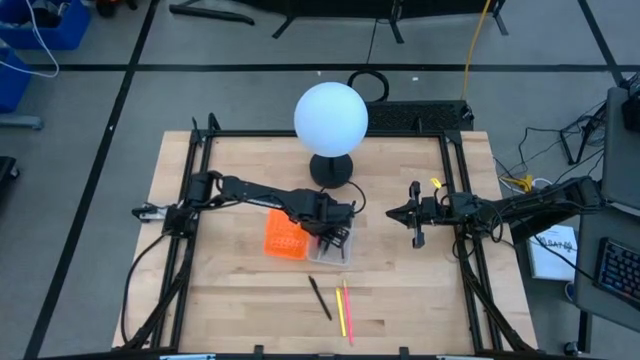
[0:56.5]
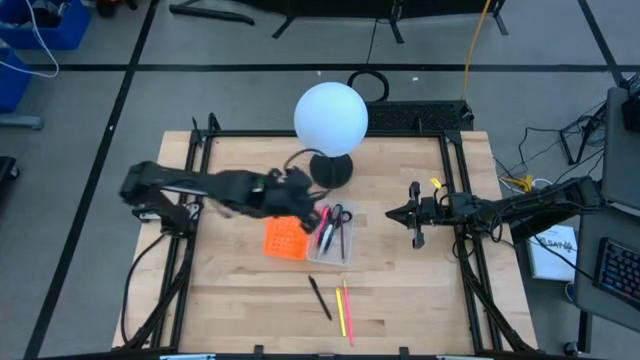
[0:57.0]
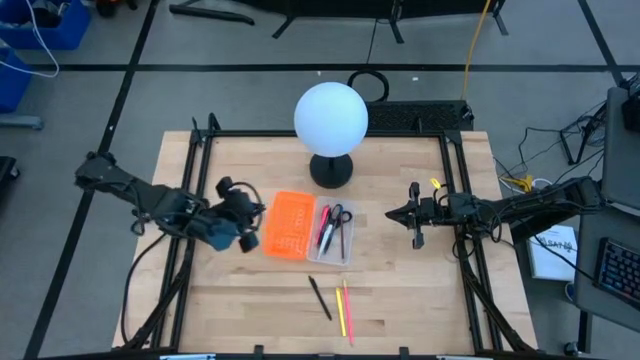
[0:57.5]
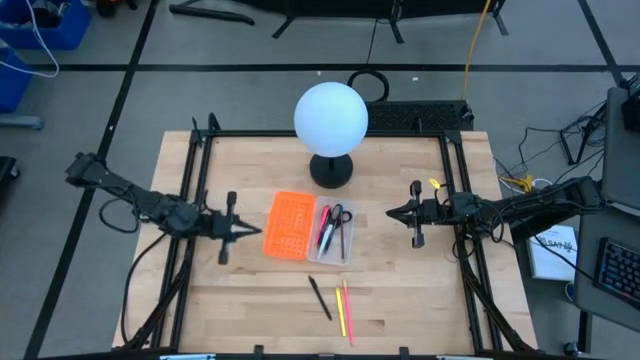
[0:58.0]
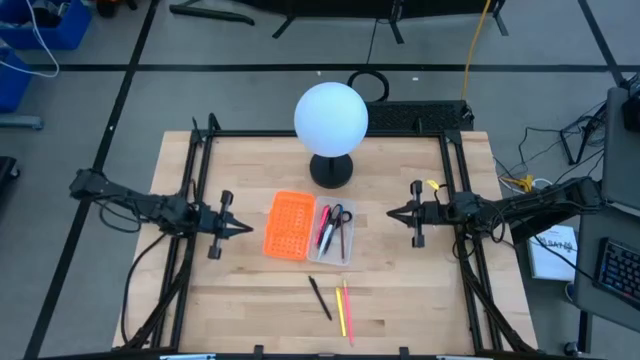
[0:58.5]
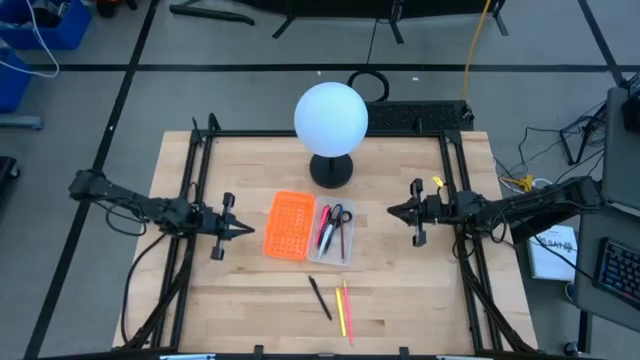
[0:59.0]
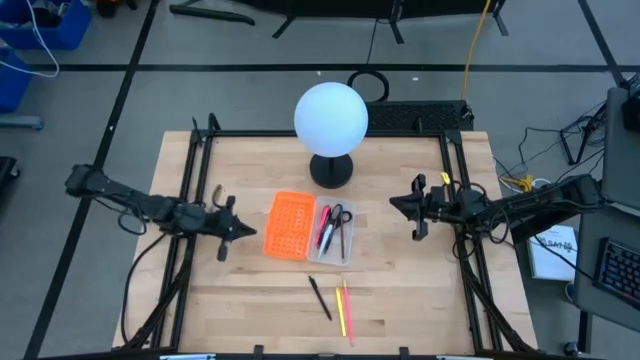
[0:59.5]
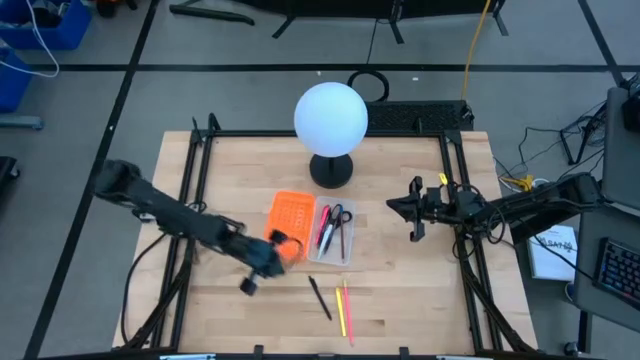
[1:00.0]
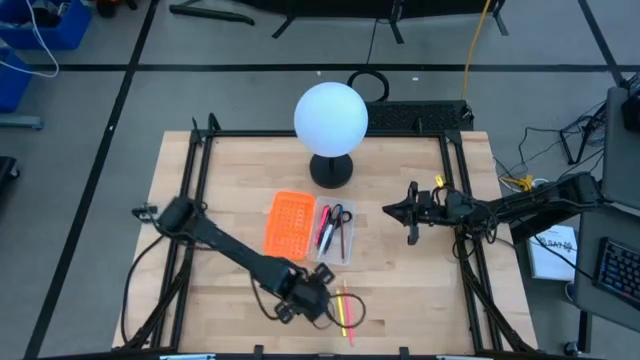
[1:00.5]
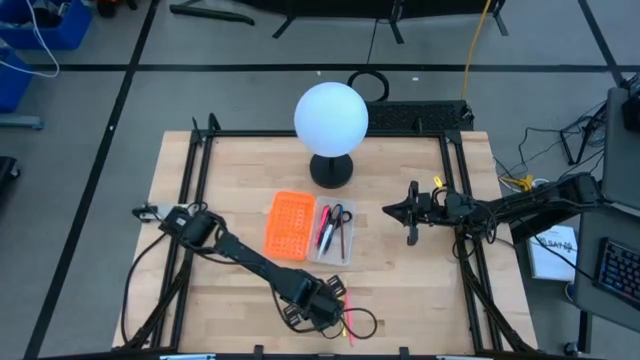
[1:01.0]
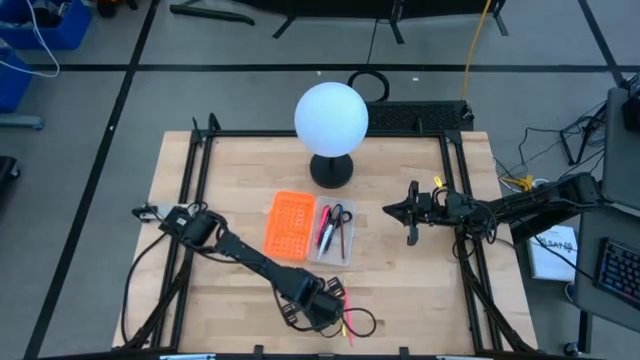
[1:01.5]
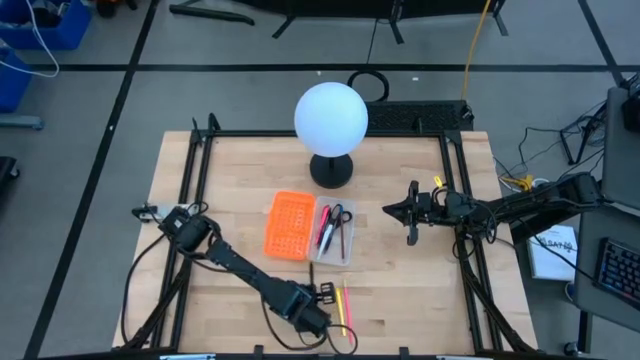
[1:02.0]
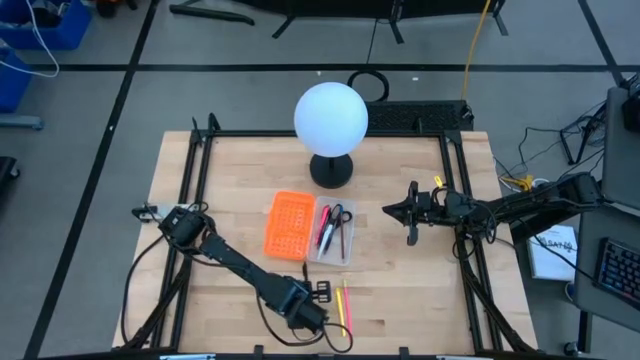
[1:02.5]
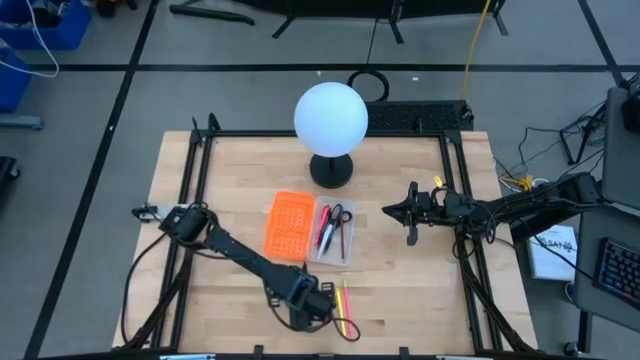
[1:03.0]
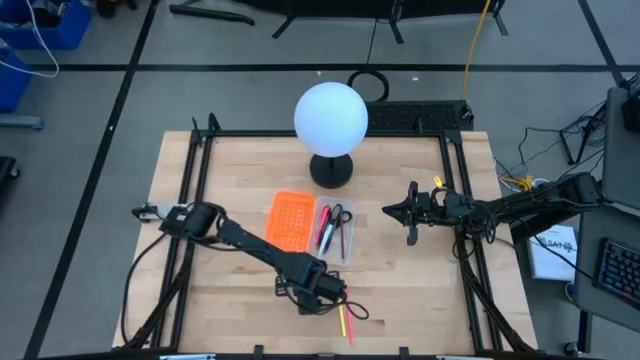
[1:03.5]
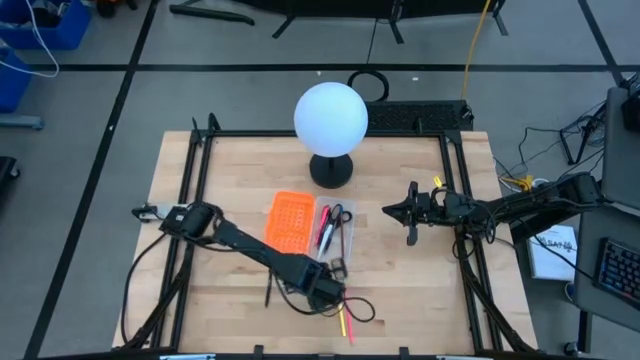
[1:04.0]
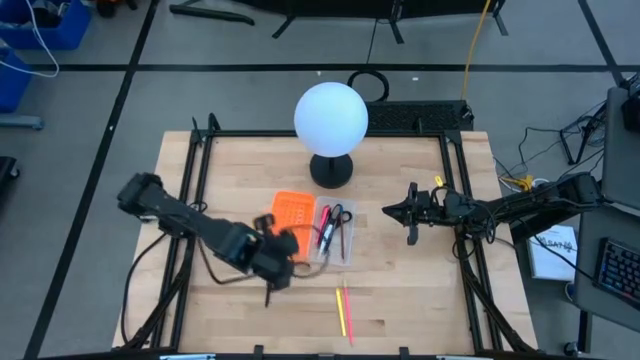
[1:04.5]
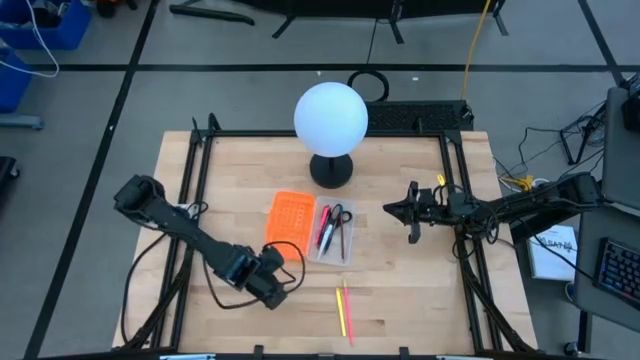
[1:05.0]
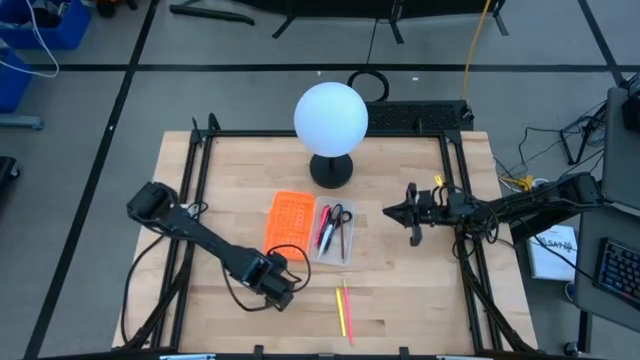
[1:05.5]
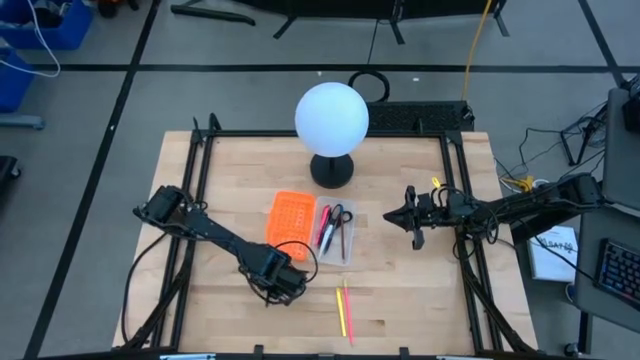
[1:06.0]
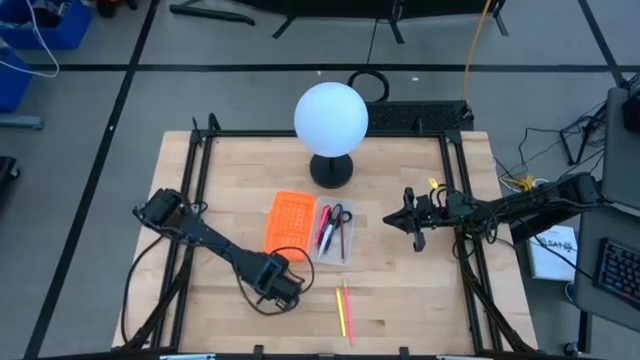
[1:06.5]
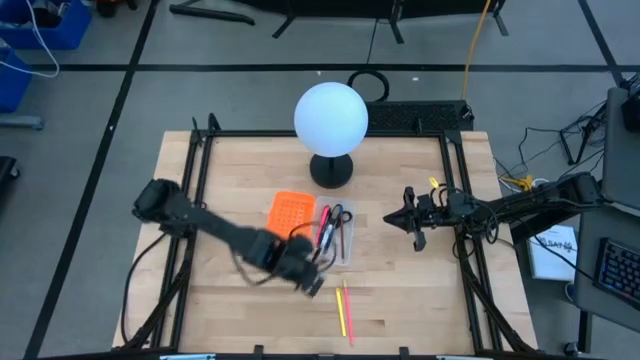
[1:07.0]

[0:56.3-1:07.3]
Task: Pick & place school supplies into a supply box
Put the black pen into the supply box

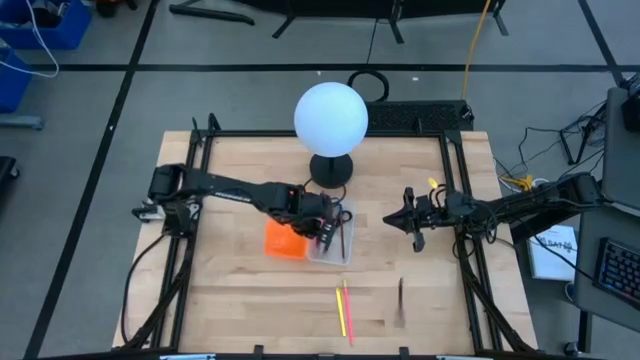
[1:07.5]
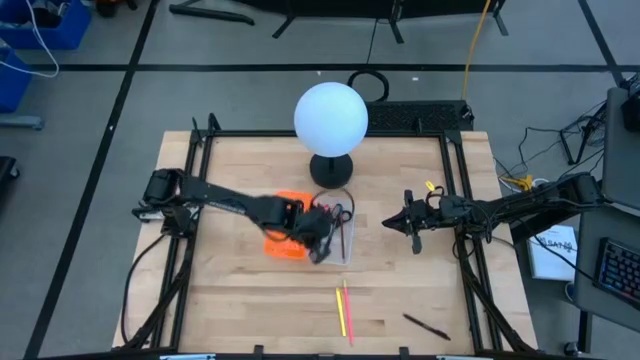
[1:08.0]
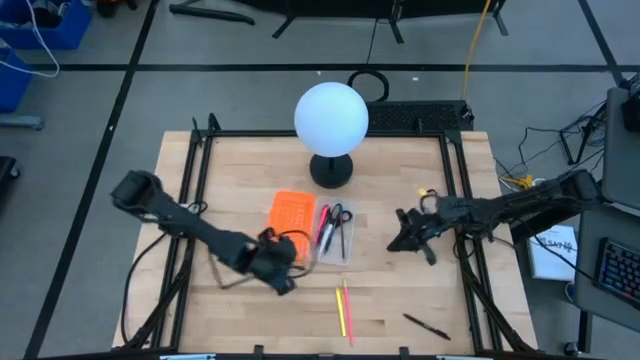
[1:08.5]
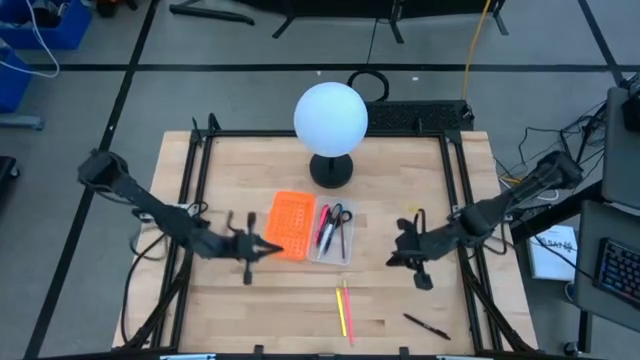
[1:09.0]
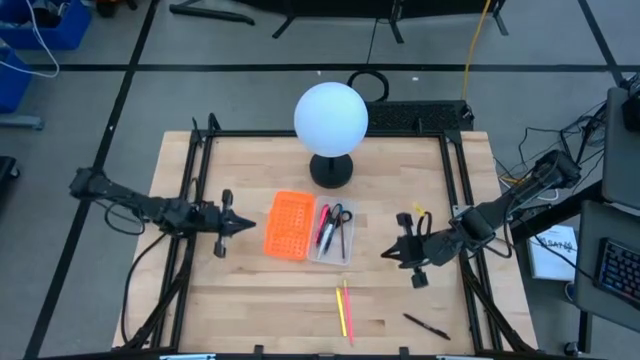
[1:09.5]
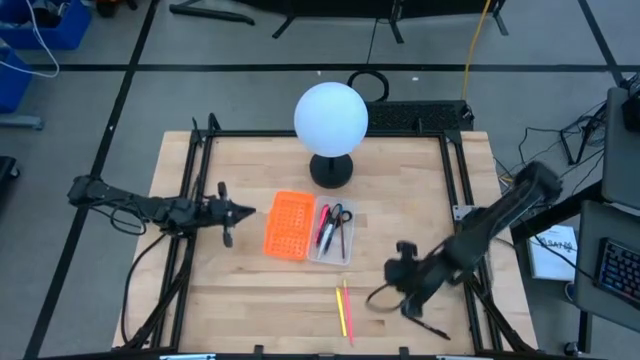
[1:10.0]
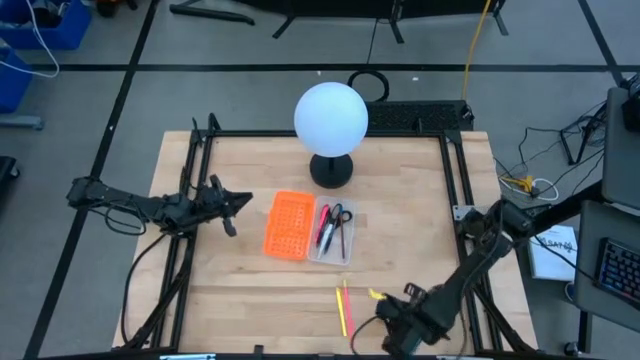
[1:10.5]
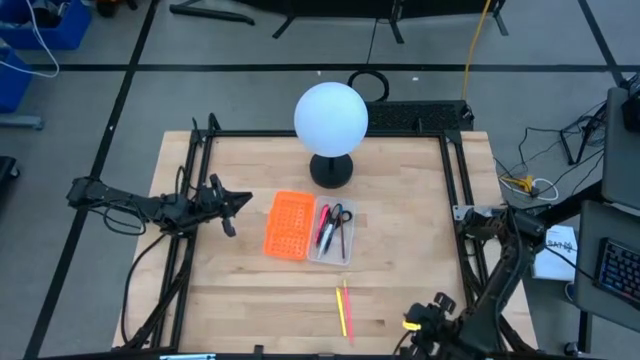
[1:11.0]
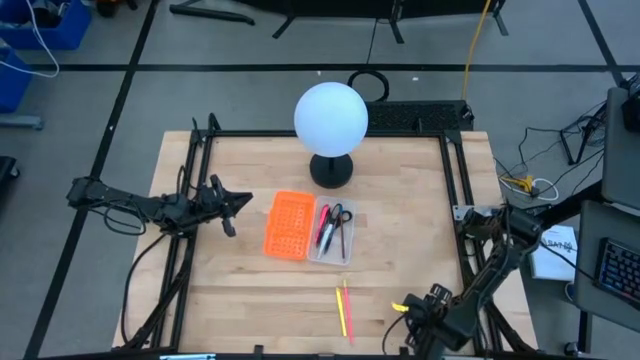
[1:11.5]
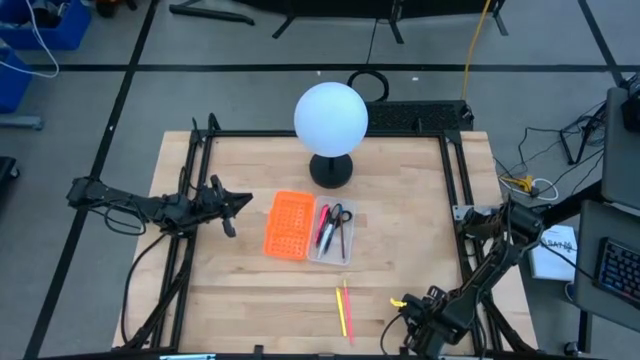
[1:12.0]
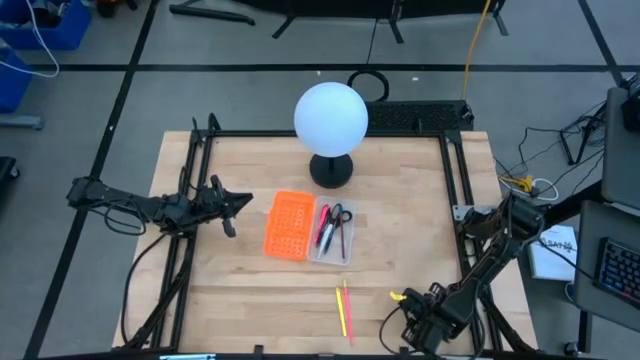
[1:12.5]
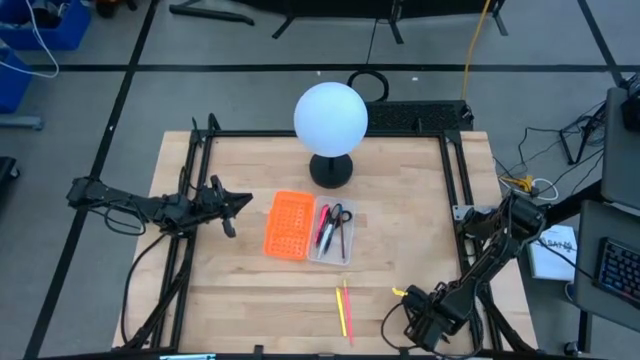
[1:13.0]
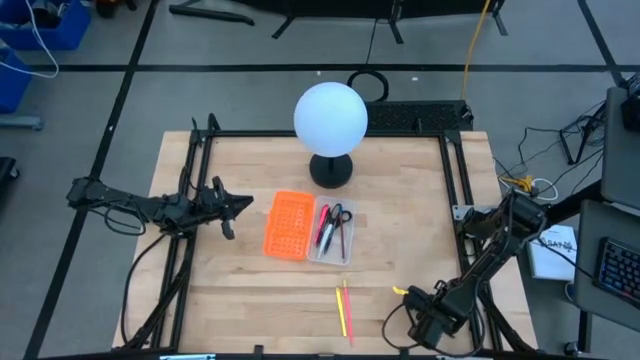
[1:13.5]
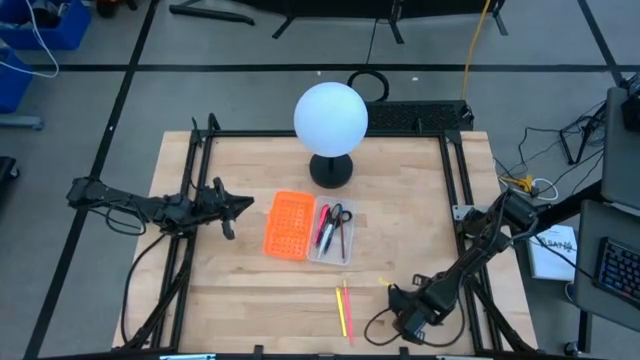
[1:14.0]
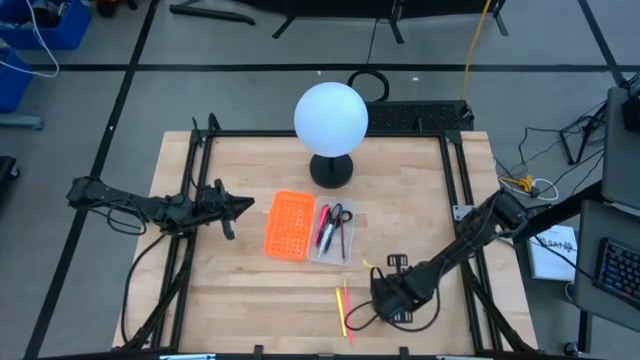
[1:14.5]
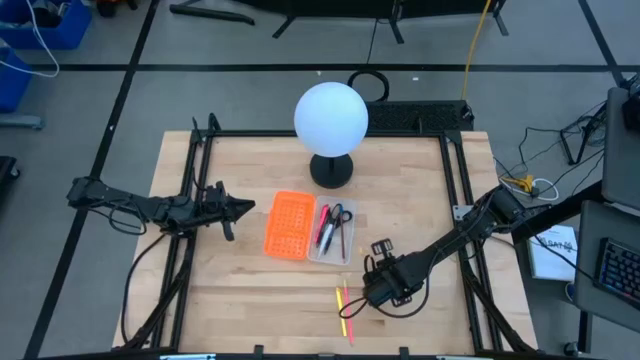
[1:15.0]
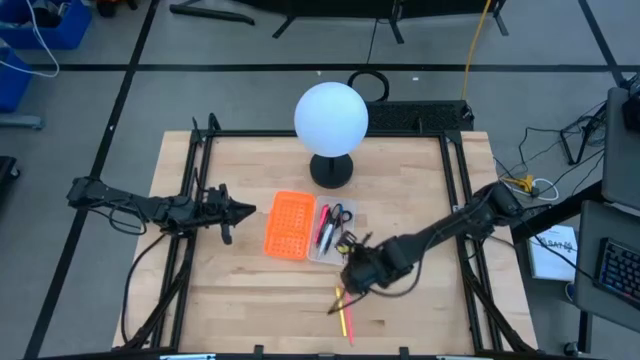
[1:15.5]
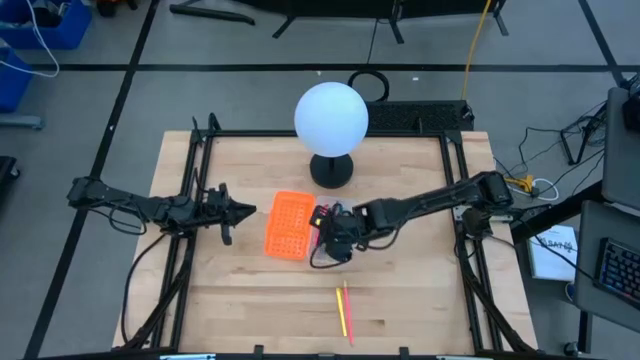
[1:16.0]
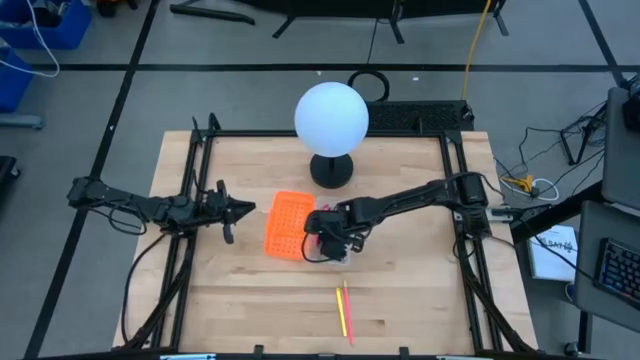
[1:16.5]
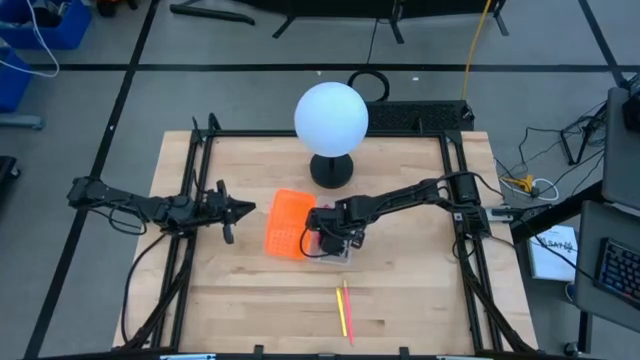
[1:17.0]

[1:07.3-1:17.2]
Put the black pen into the supply box

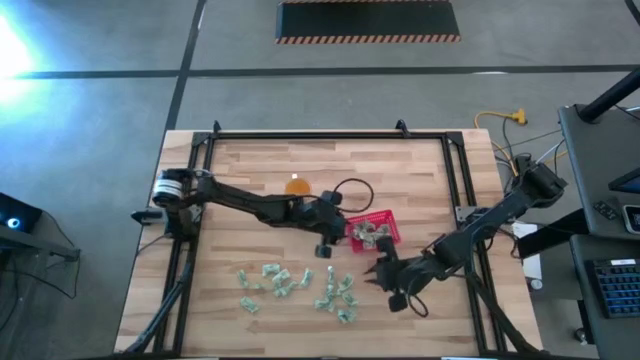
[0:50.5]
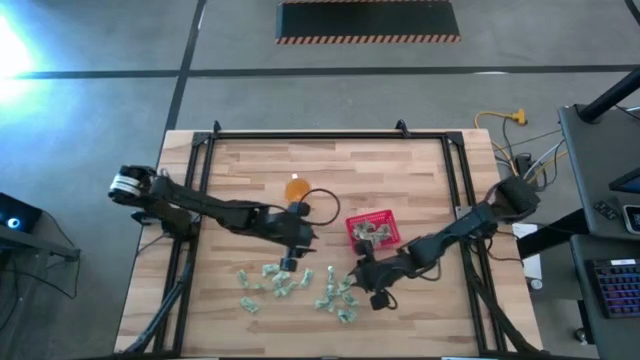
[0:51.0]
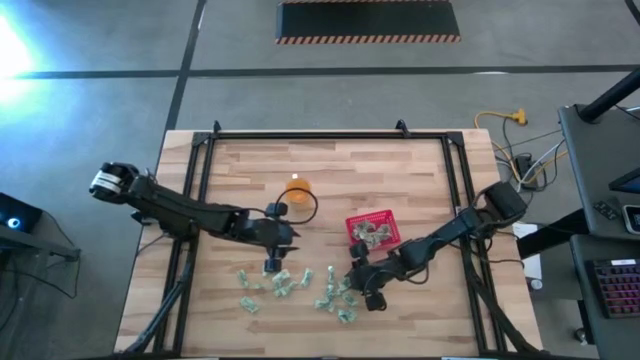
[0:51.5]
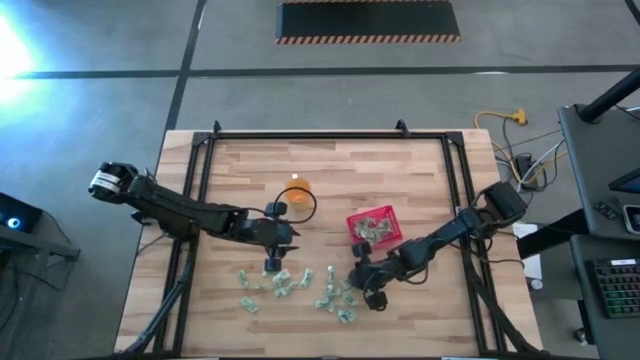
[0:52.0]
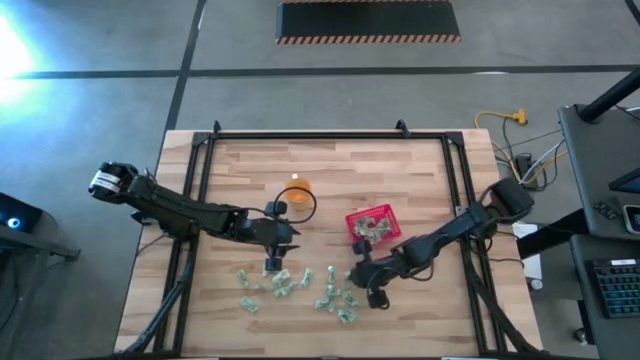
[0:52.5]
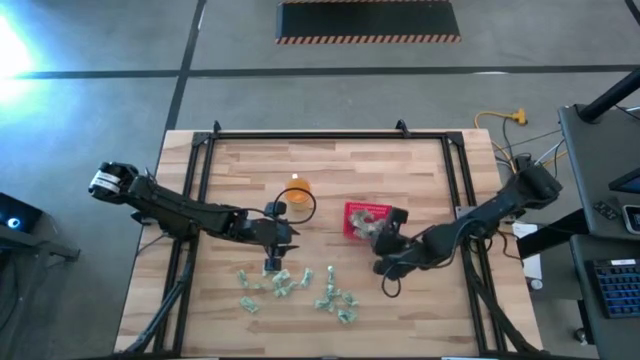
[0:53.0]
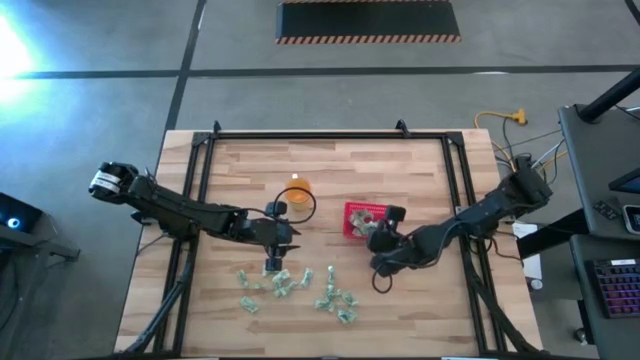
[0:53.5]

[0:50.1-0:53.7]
Task: Pick and place Stevia / Truvia into bins
Put the stevia packet into the basket
